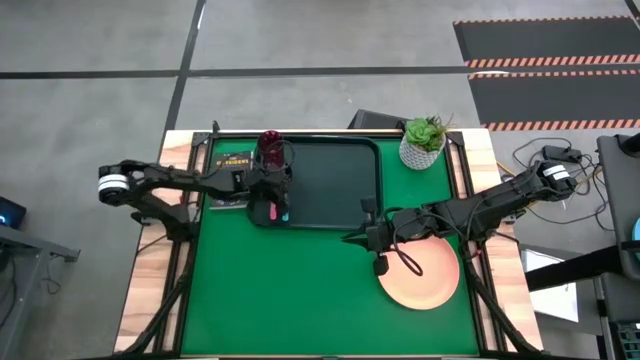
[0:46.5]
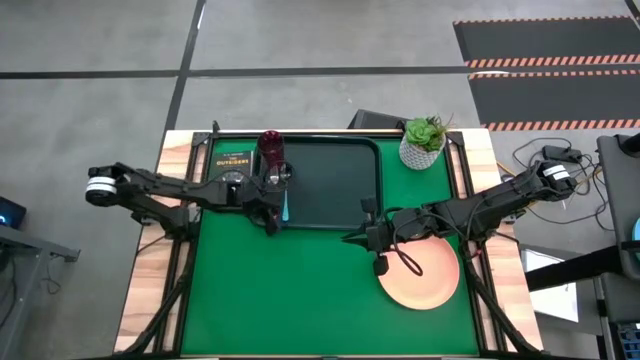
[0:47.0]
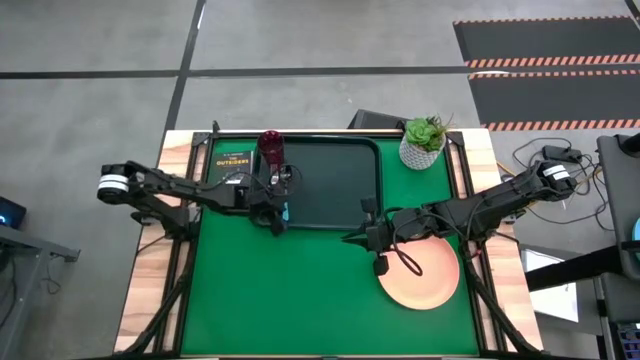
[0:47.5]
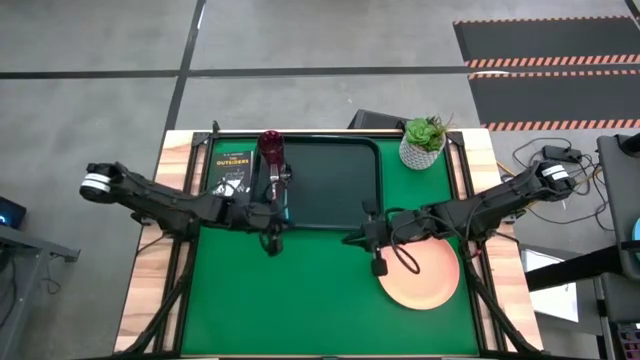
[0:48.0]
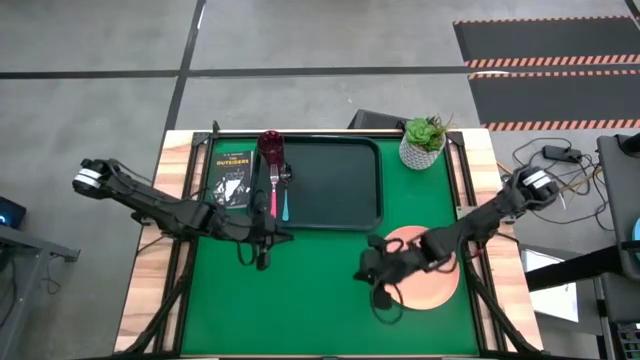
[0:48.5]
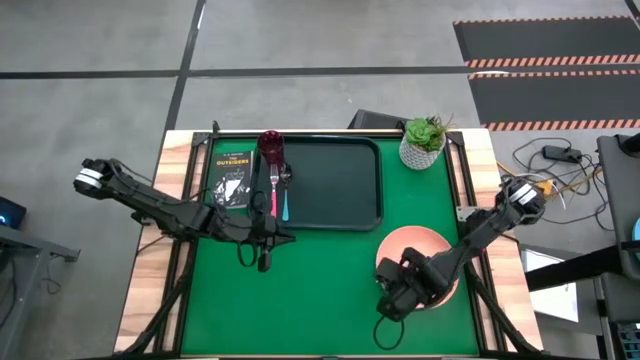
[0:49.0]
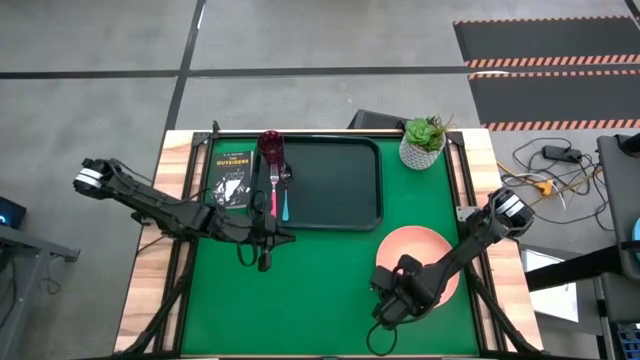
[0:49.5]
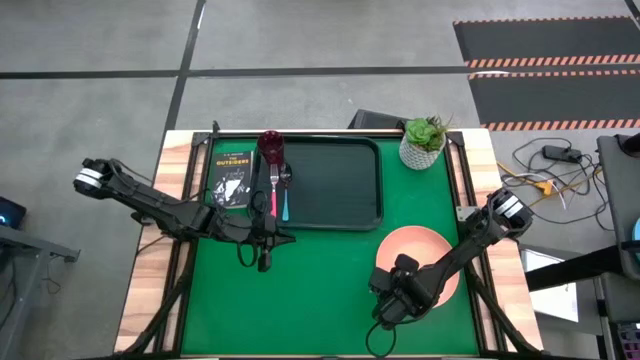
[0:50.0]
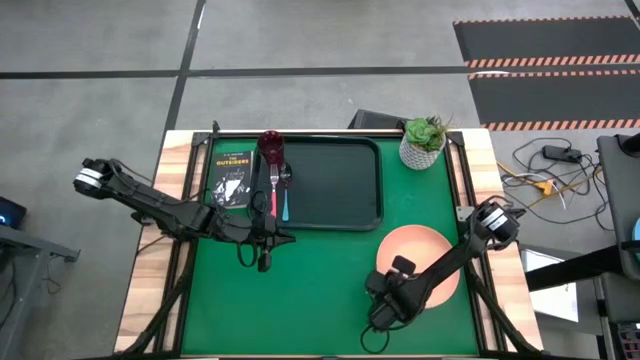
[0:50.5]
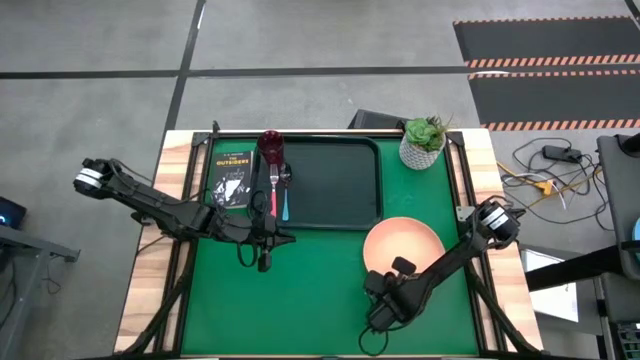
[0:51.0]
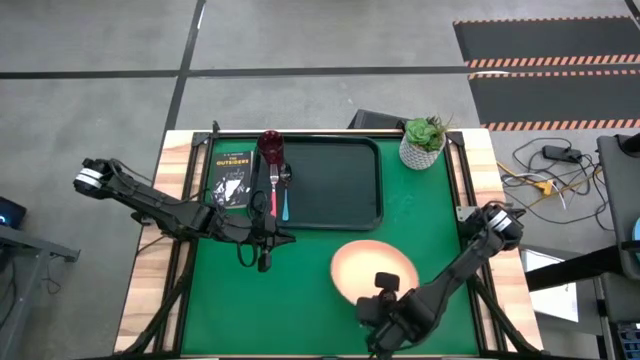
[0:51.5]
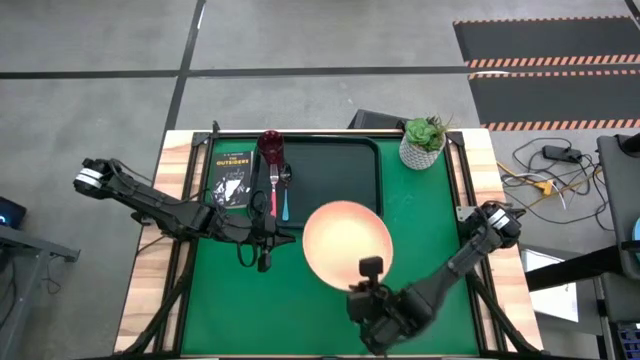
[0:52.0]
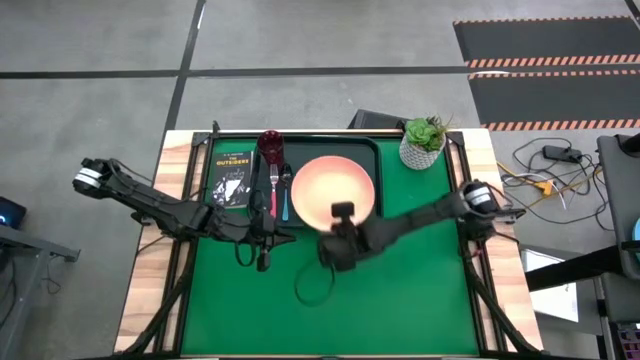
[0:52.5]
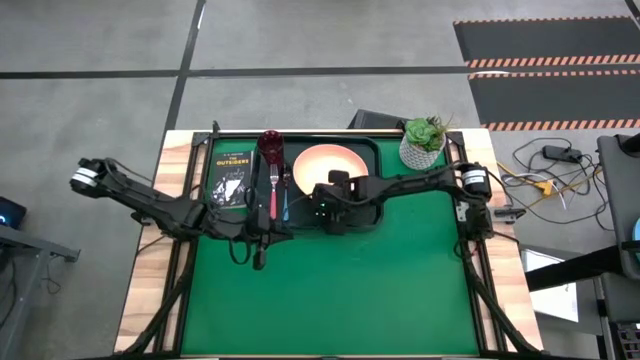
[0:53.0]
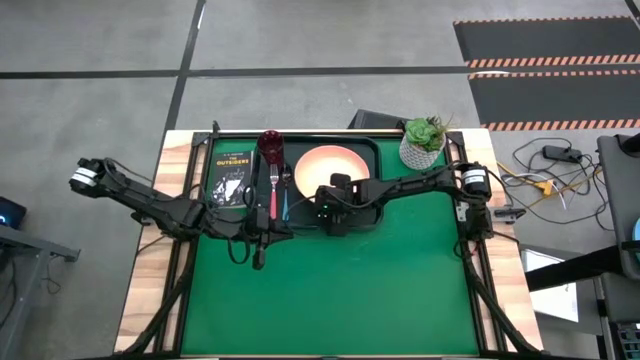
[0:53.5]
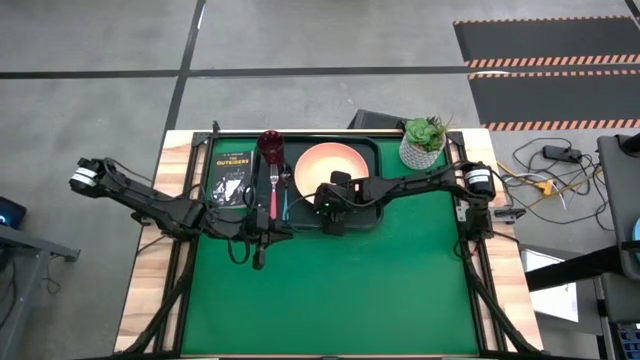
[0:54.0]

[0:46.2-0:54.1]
Task: Pick and place plate/cup/fork/spoon on tray
Put the white plate to the right of the blue spoon on the black tray

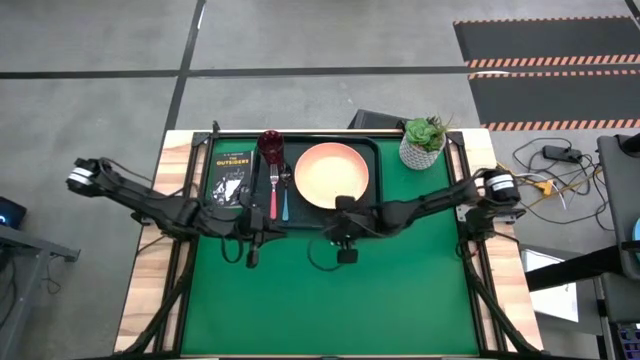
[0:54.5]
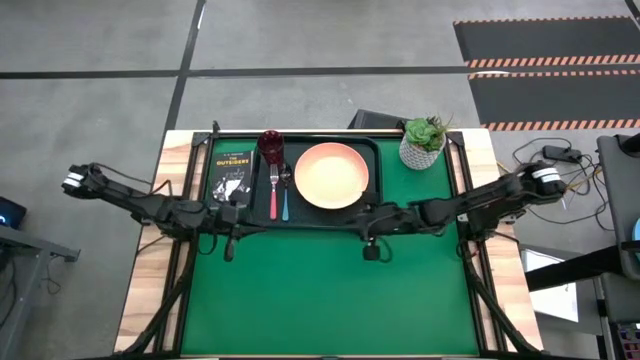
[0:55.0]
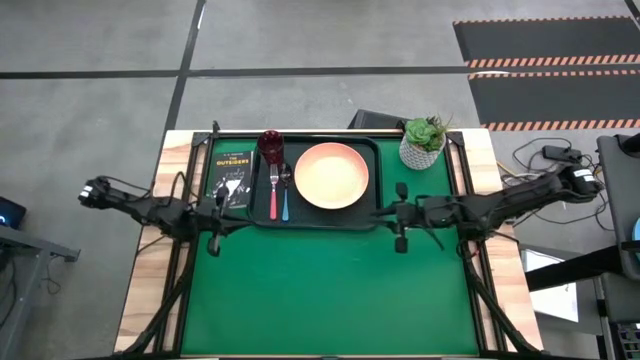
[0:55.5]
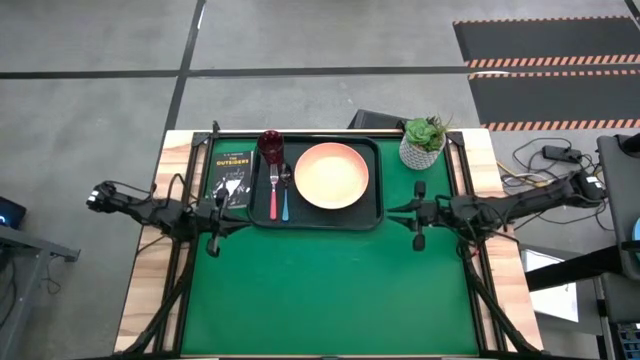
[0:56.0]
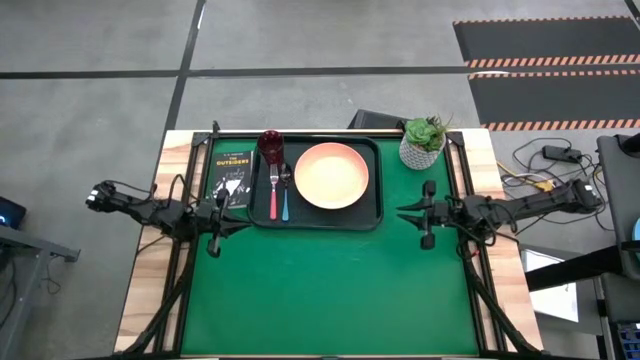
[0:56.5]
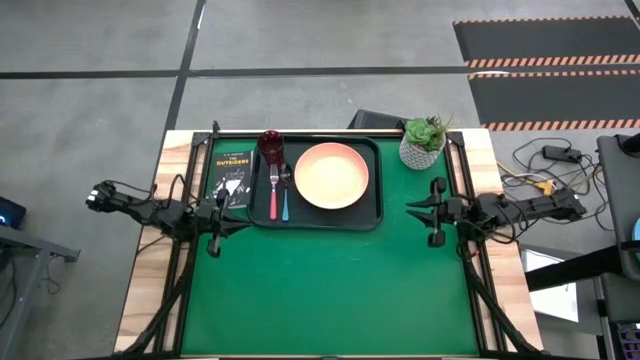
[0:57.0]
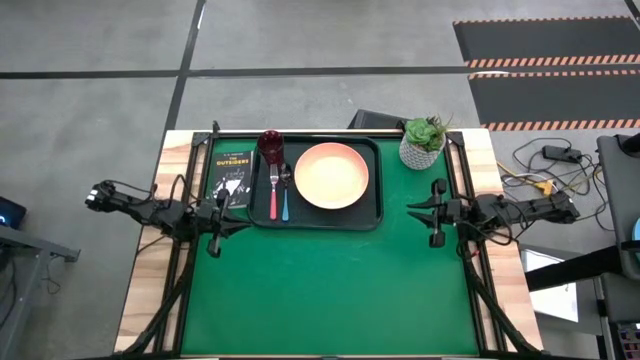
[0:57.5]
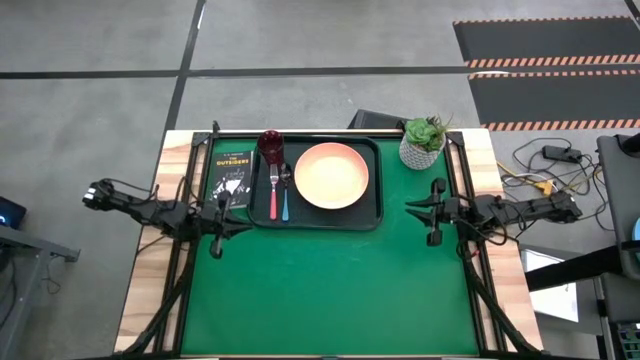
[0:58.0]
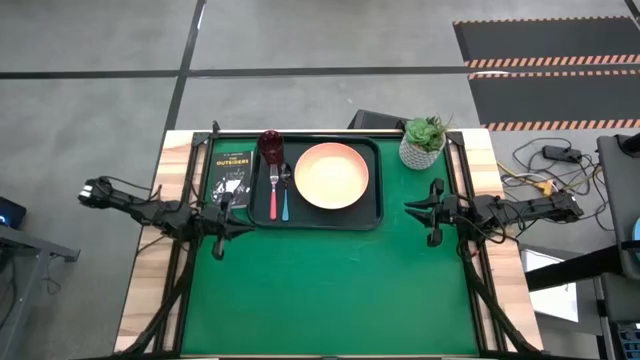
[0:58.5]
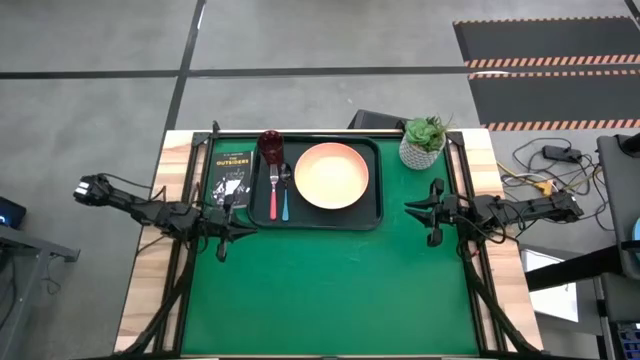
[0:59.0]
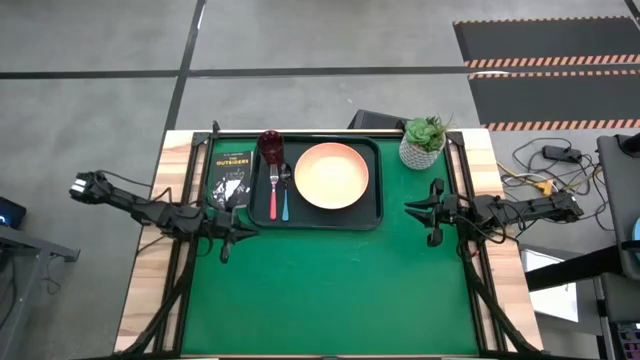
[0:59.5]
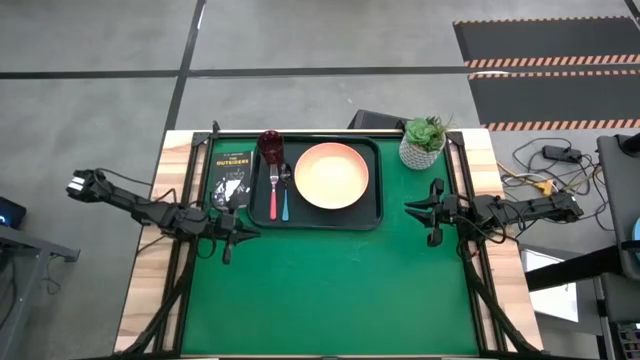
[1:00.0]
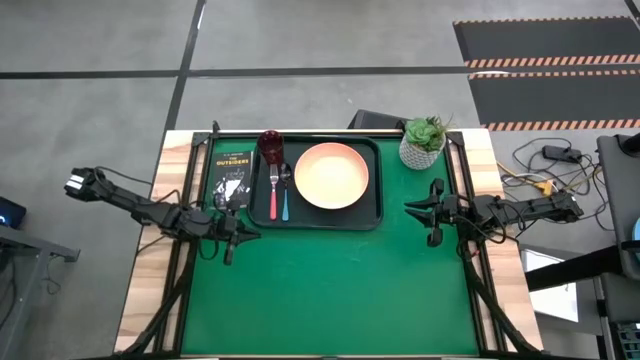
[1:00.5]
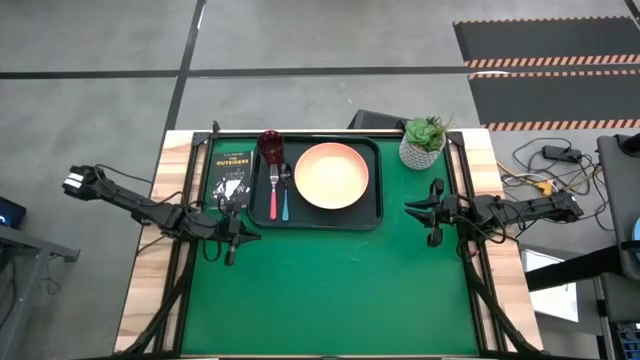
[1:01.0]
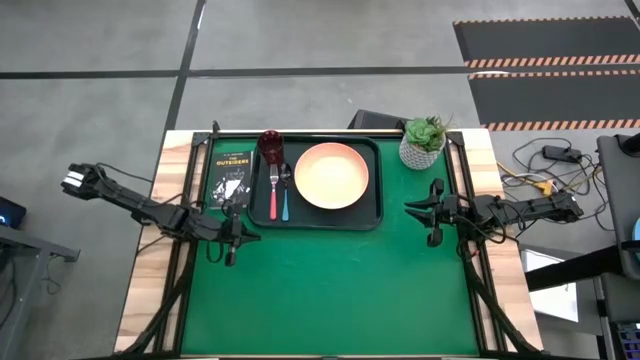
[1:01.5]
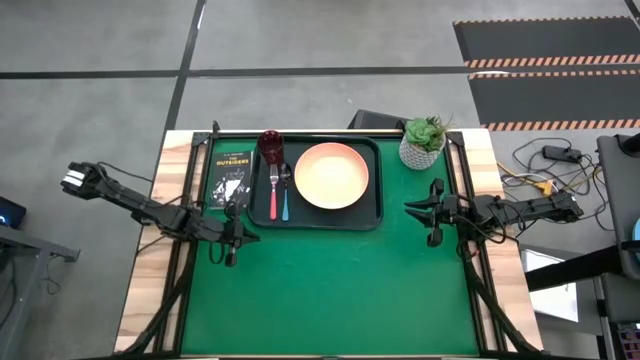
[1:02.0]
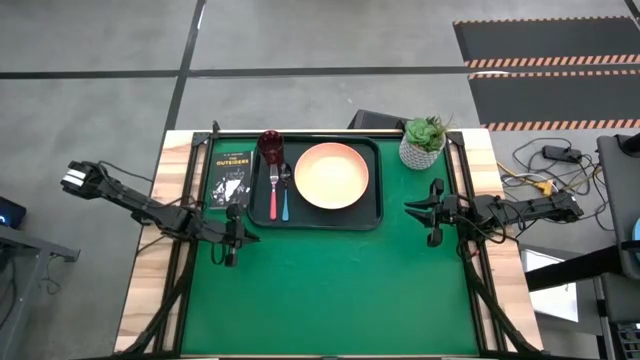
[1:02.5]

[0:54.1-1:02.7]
Return to Home Position

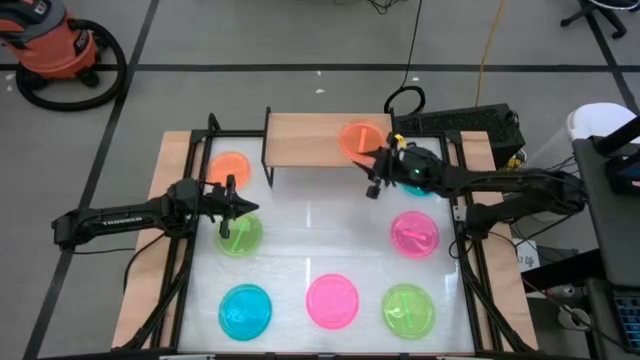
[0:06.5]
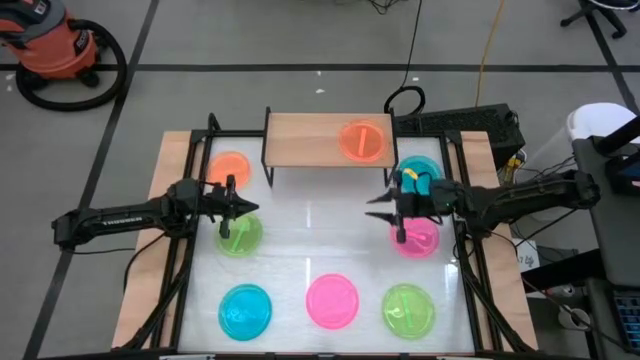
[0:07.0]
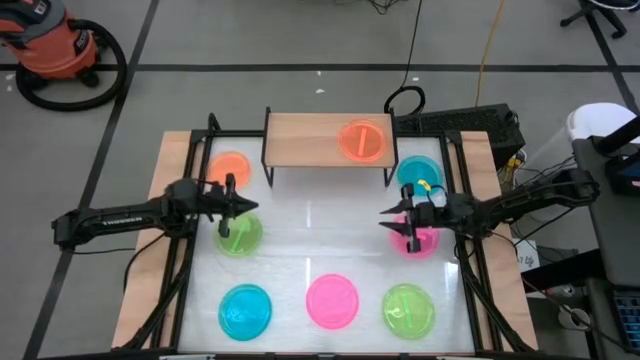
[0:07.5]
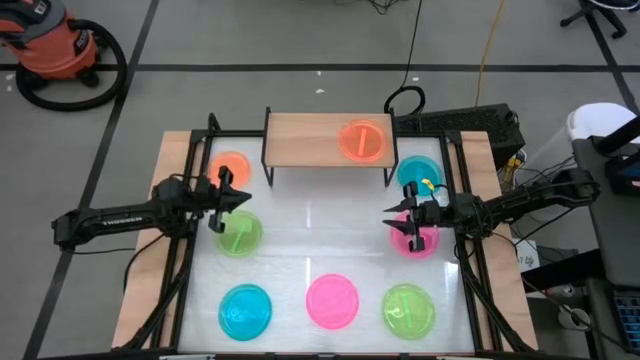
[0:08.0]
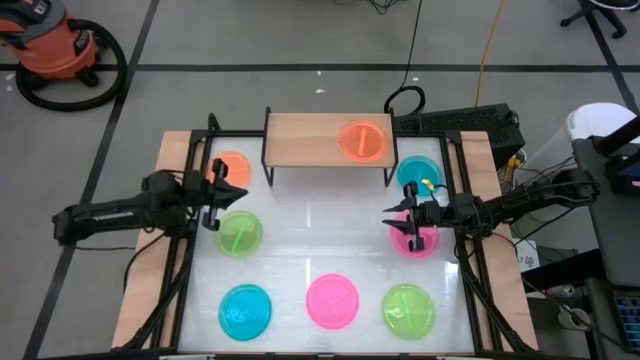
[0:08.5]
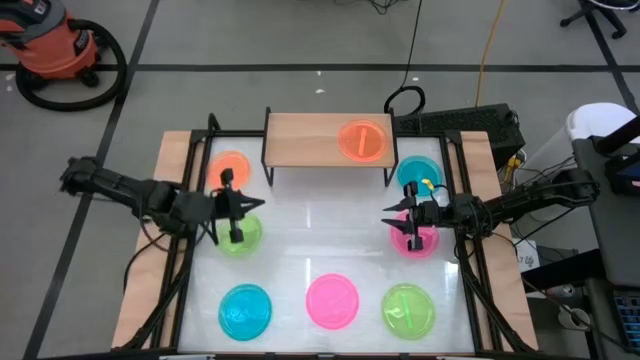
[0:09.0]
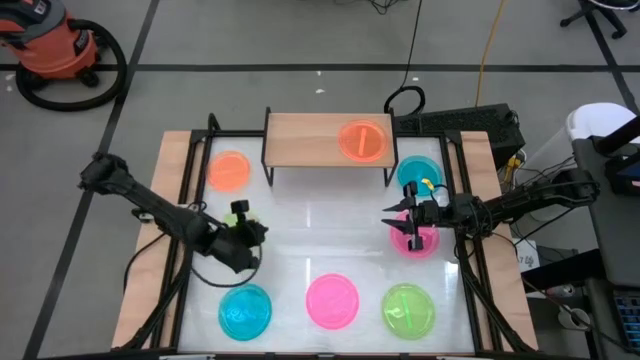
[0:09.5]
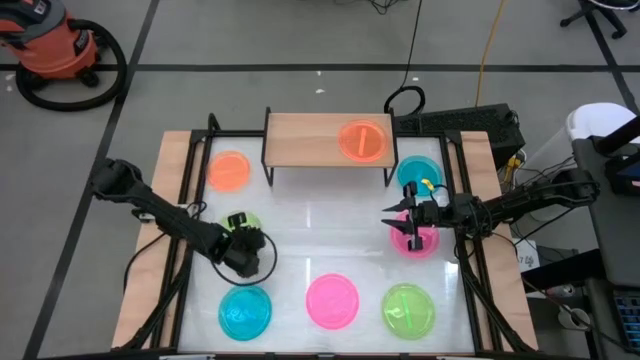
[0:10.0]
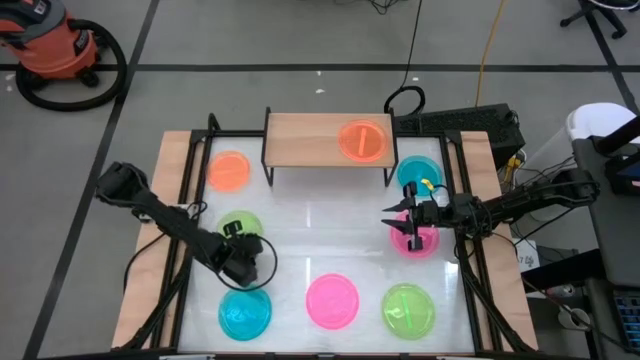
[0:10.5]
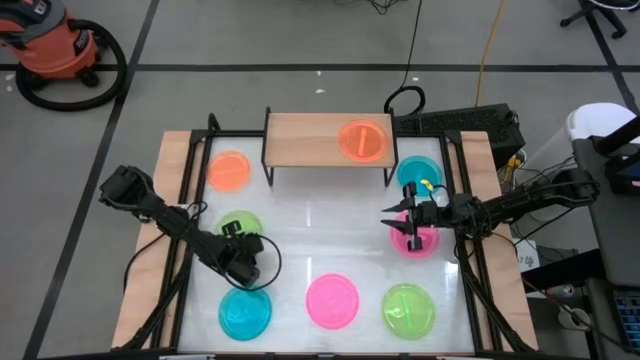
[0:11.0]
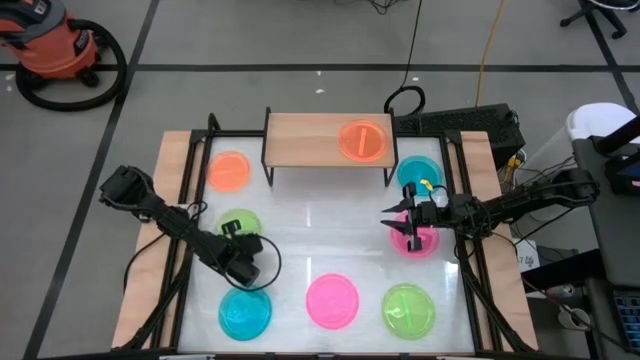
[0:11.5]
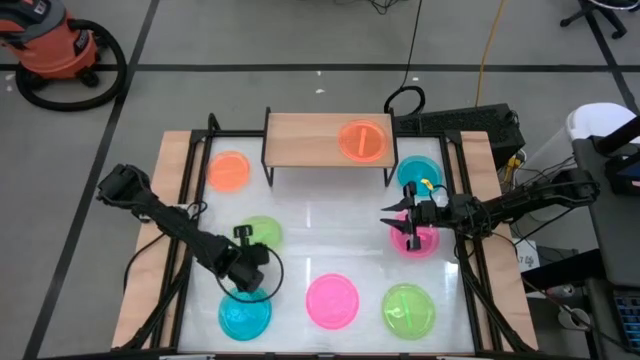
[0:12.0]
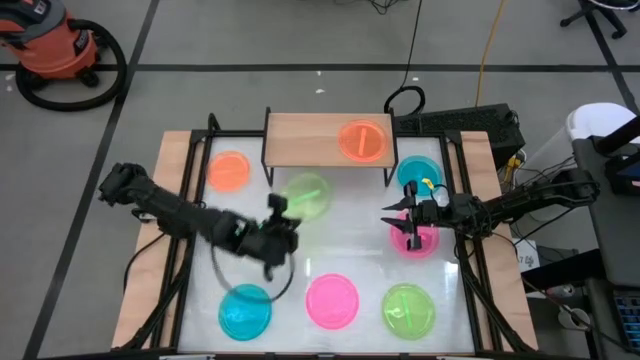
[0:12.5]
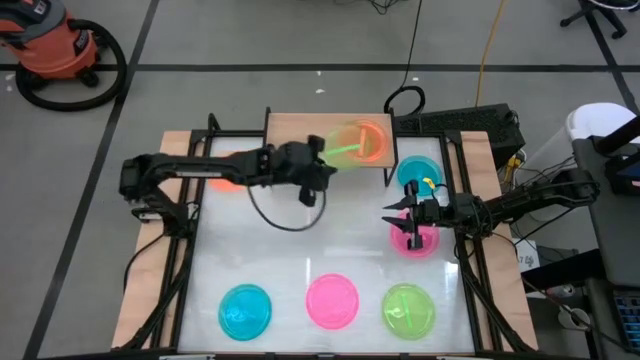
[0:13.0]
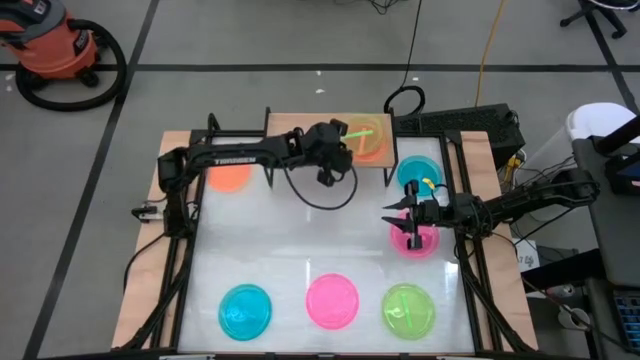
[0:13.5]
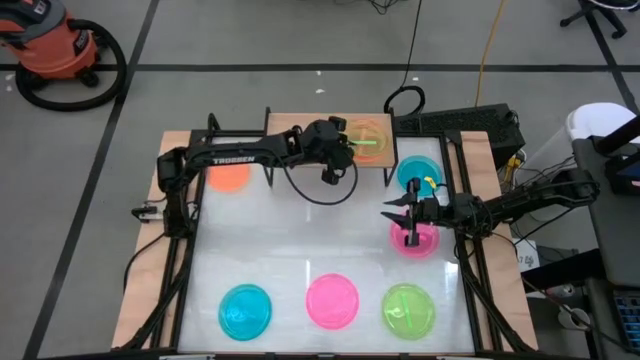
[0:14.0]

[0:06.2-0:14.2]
Task: Place and stack plates onto a shelf
Stack the top green plate on top of the orange plate on the shelf
